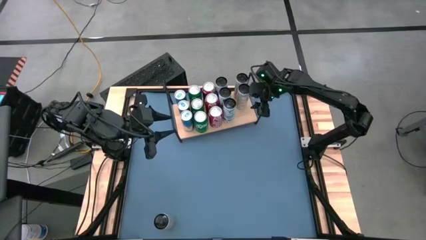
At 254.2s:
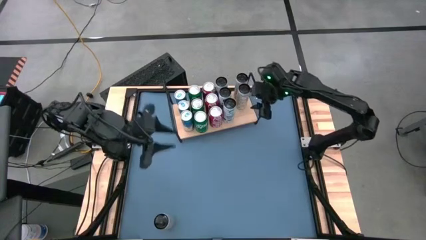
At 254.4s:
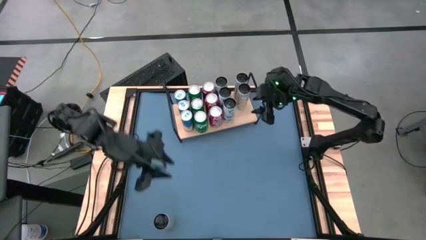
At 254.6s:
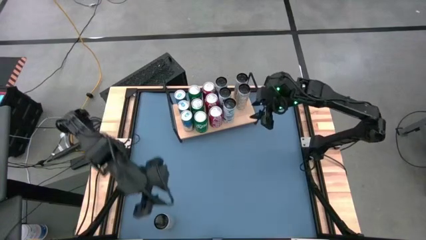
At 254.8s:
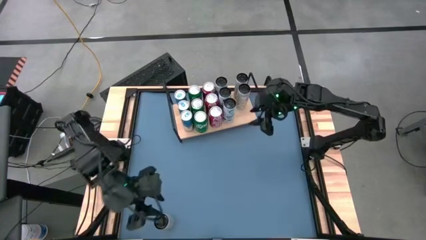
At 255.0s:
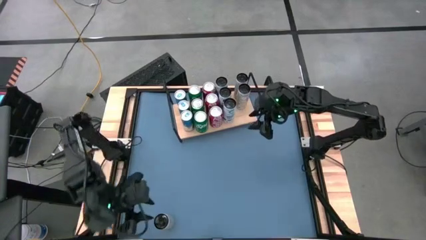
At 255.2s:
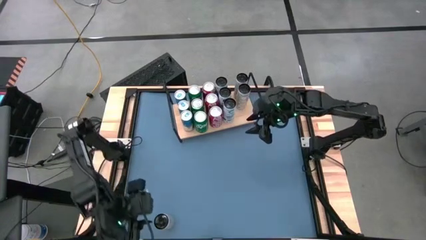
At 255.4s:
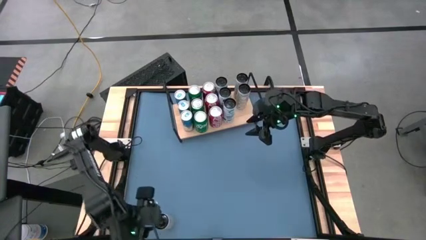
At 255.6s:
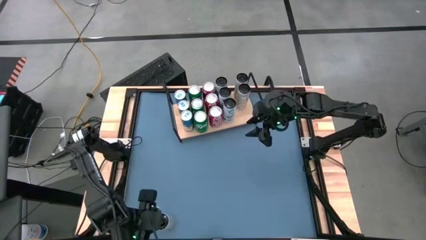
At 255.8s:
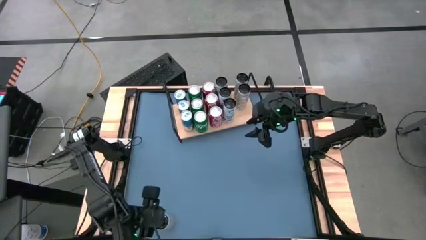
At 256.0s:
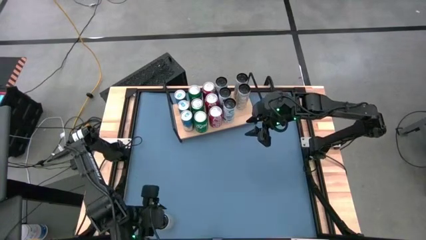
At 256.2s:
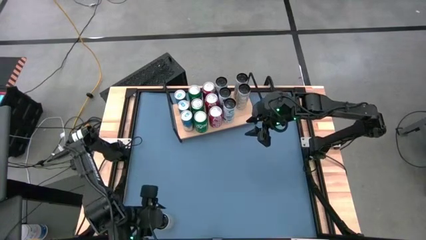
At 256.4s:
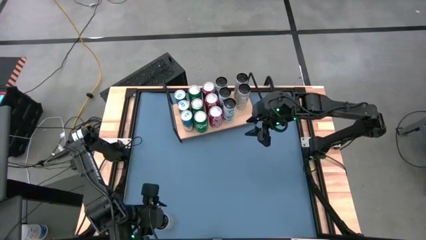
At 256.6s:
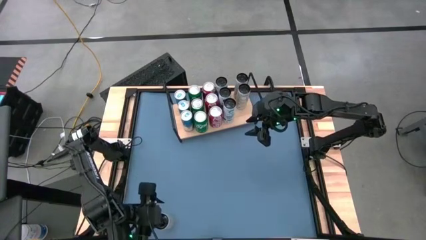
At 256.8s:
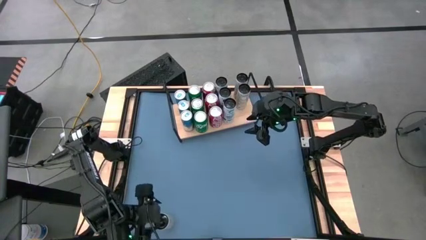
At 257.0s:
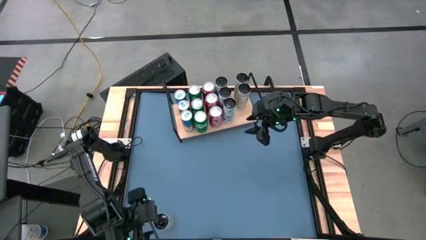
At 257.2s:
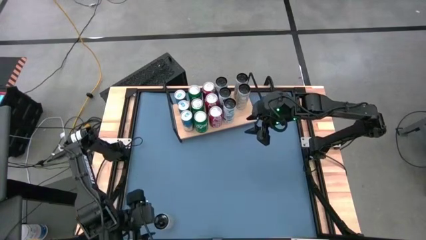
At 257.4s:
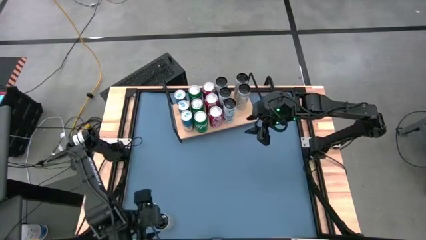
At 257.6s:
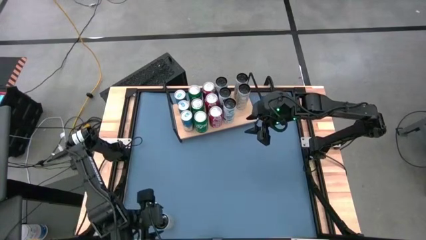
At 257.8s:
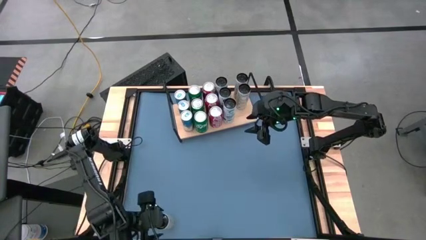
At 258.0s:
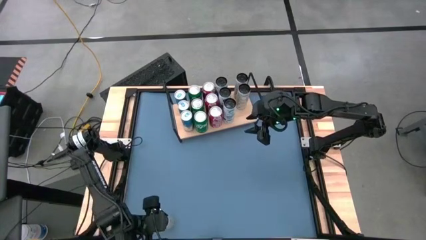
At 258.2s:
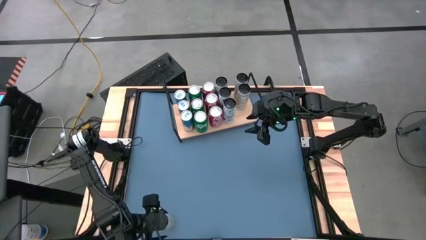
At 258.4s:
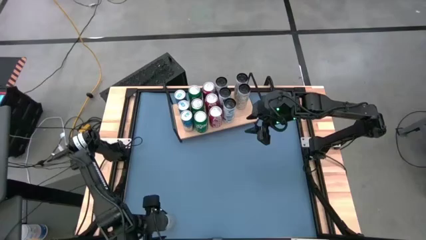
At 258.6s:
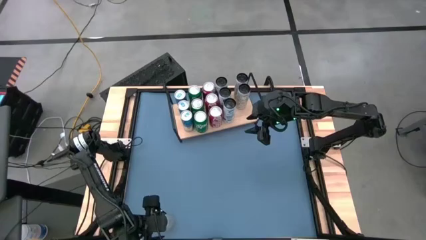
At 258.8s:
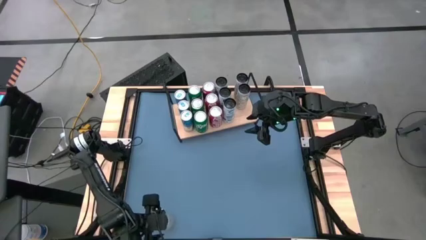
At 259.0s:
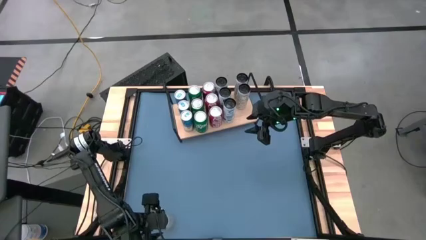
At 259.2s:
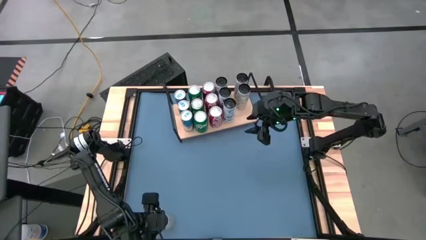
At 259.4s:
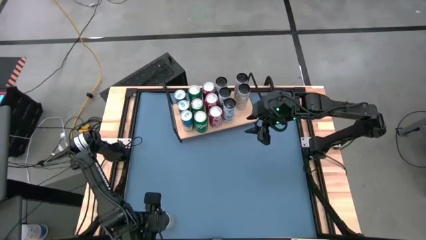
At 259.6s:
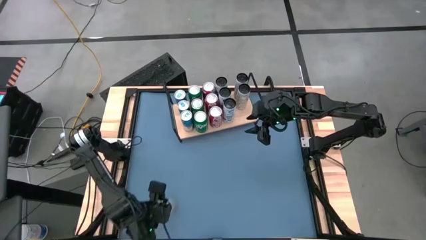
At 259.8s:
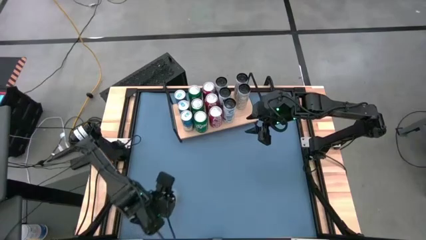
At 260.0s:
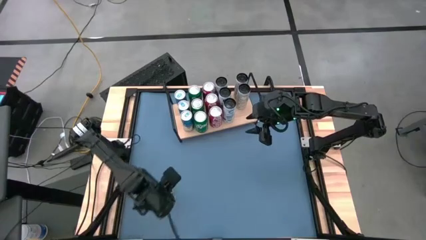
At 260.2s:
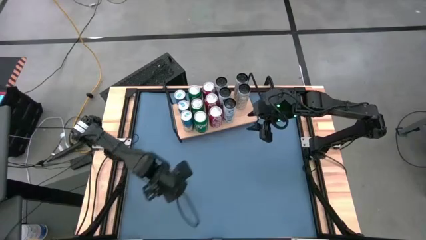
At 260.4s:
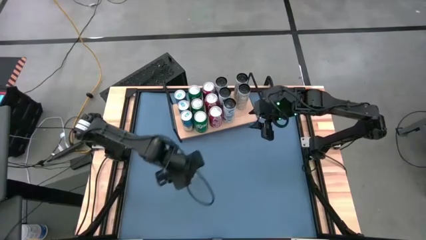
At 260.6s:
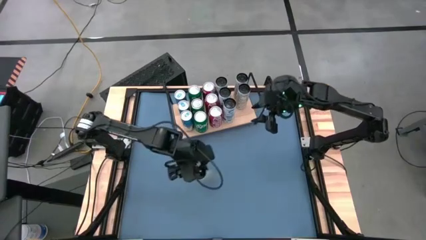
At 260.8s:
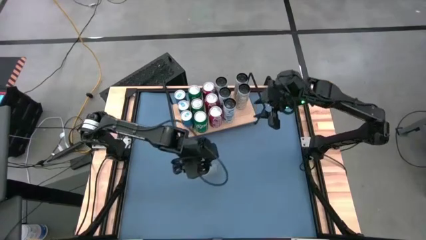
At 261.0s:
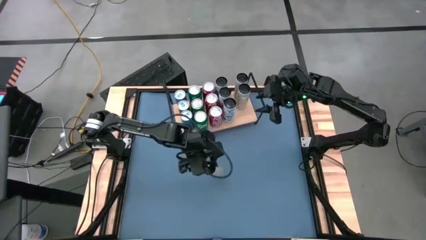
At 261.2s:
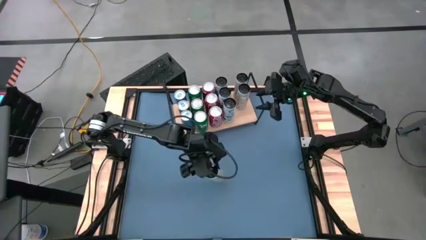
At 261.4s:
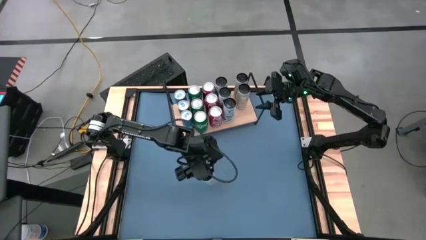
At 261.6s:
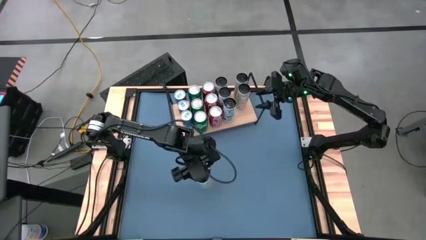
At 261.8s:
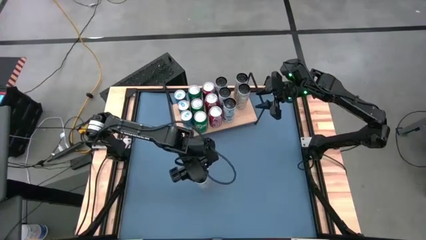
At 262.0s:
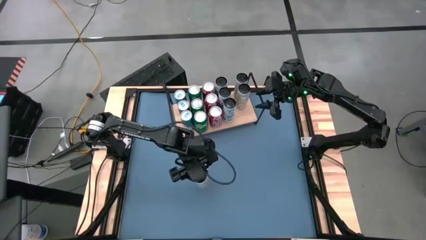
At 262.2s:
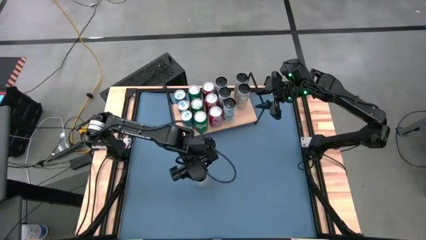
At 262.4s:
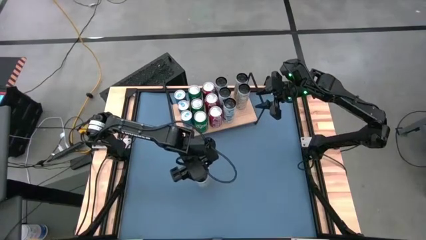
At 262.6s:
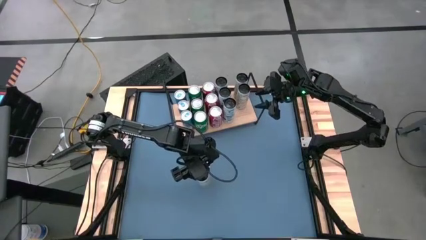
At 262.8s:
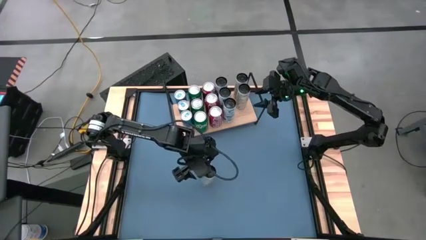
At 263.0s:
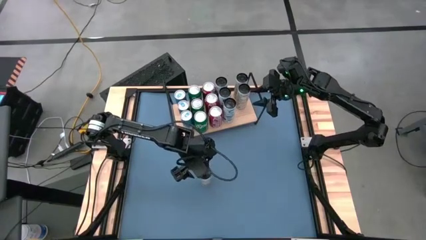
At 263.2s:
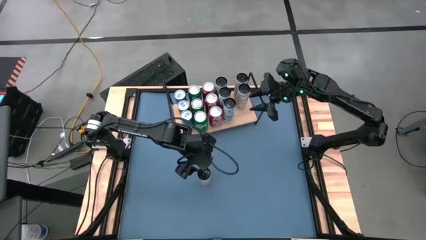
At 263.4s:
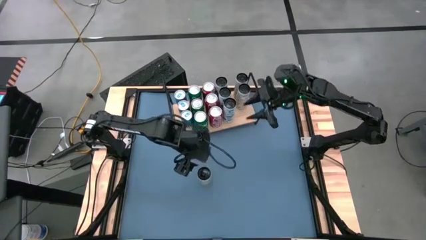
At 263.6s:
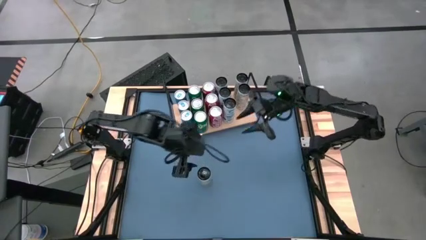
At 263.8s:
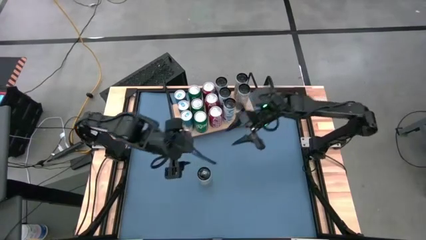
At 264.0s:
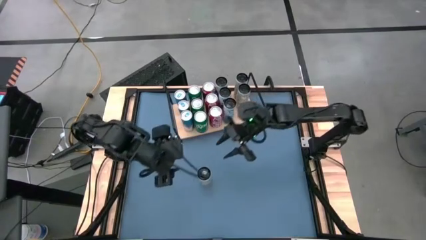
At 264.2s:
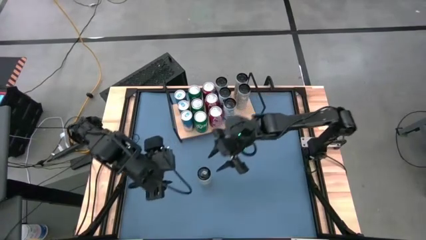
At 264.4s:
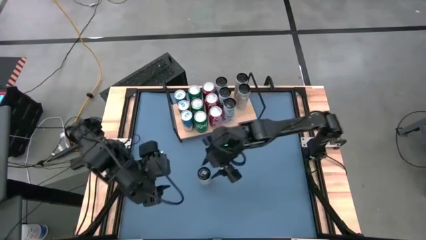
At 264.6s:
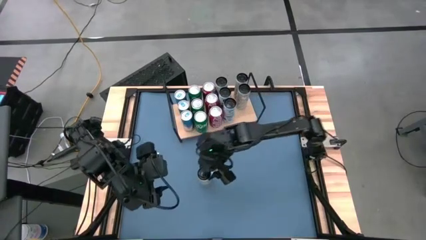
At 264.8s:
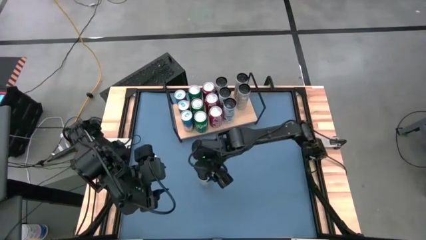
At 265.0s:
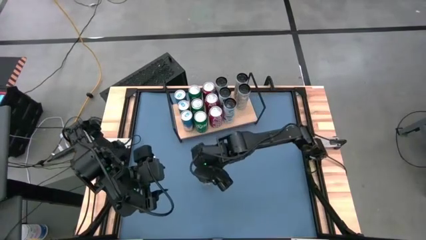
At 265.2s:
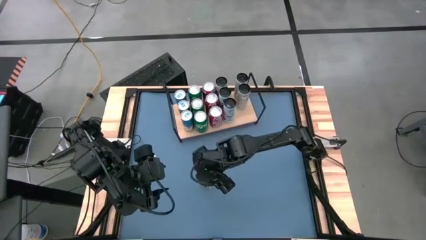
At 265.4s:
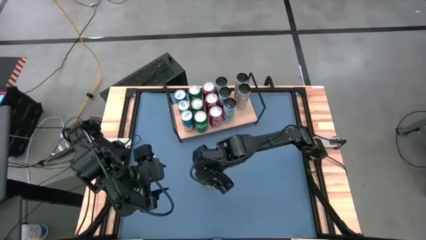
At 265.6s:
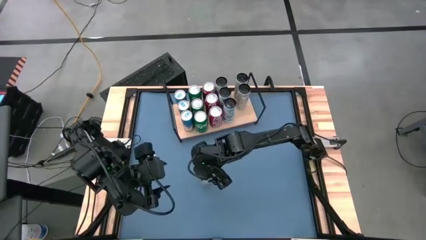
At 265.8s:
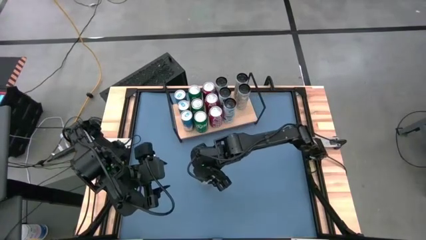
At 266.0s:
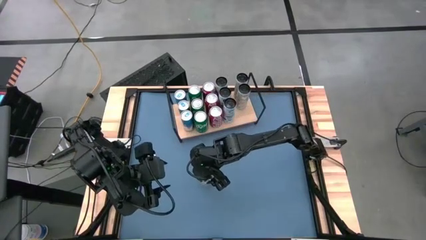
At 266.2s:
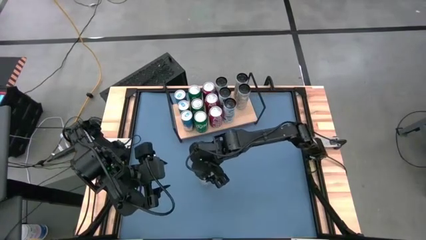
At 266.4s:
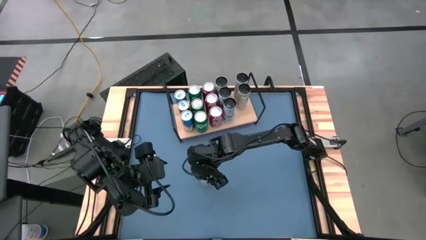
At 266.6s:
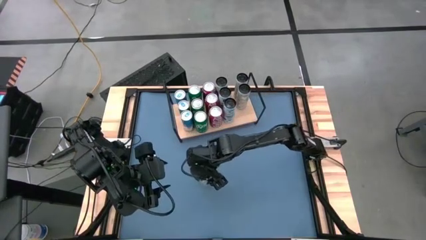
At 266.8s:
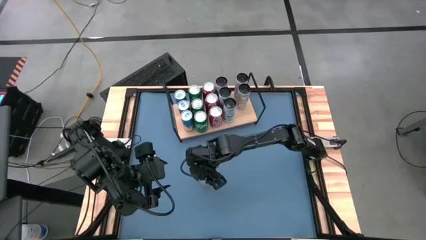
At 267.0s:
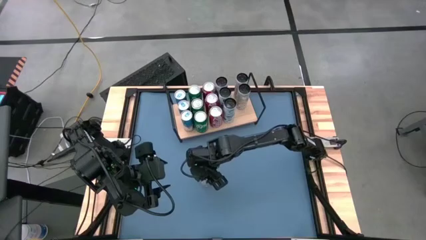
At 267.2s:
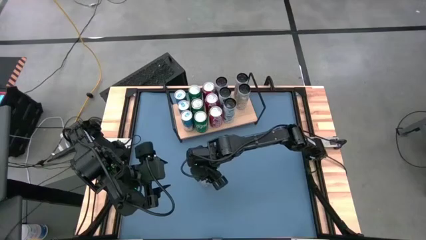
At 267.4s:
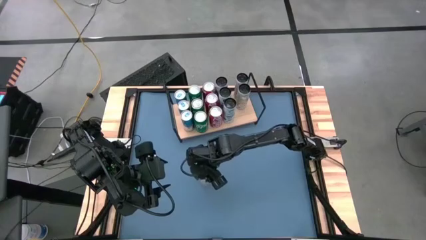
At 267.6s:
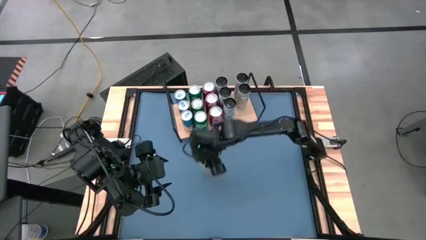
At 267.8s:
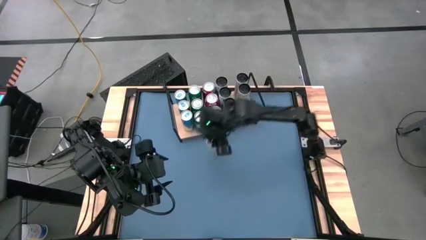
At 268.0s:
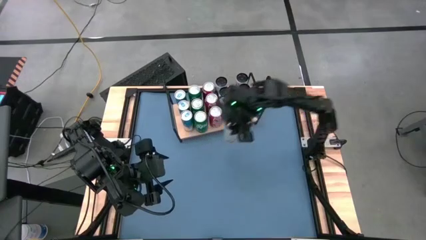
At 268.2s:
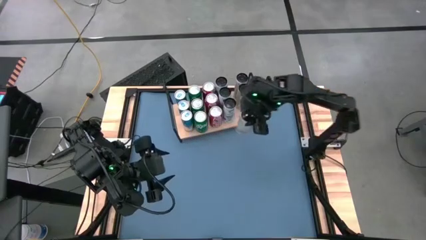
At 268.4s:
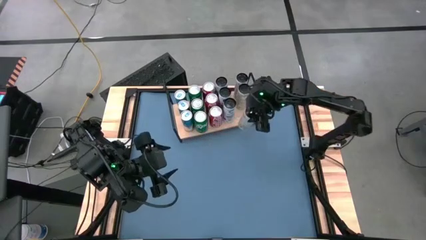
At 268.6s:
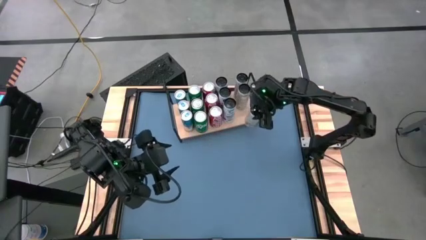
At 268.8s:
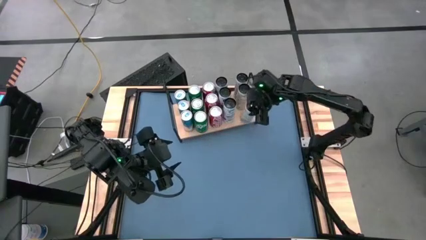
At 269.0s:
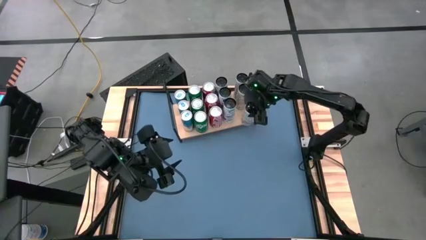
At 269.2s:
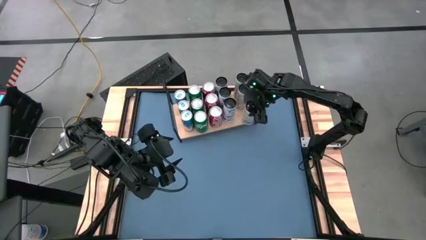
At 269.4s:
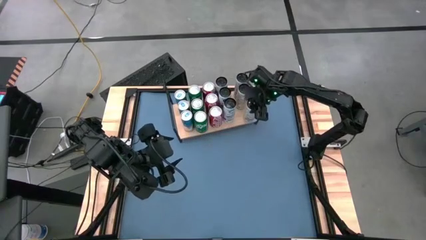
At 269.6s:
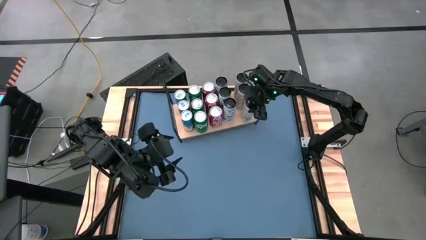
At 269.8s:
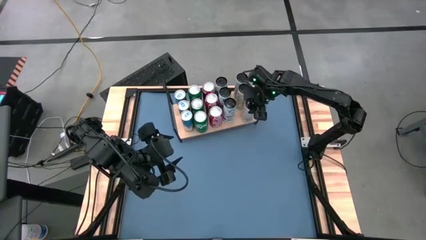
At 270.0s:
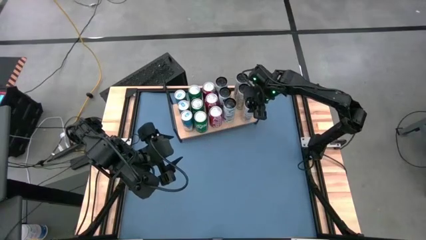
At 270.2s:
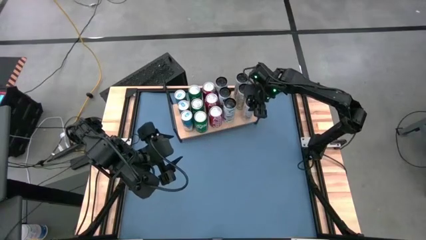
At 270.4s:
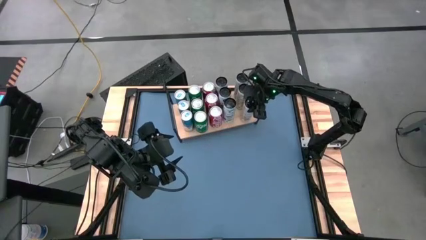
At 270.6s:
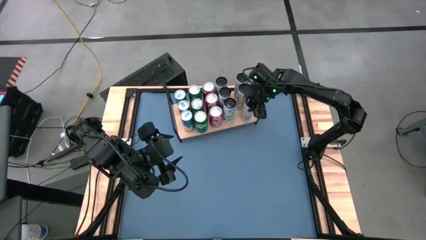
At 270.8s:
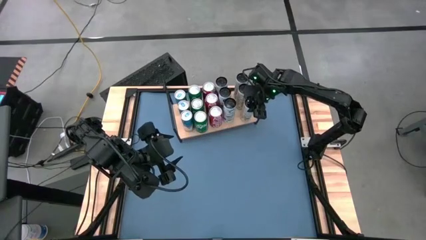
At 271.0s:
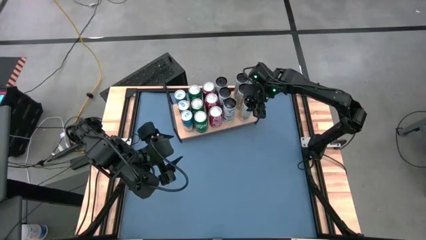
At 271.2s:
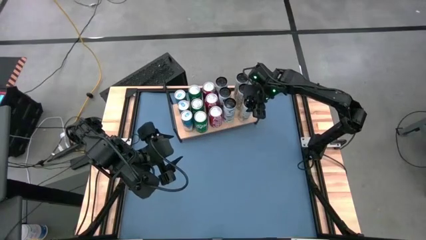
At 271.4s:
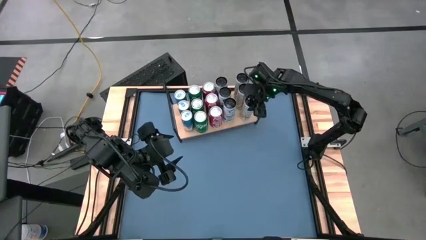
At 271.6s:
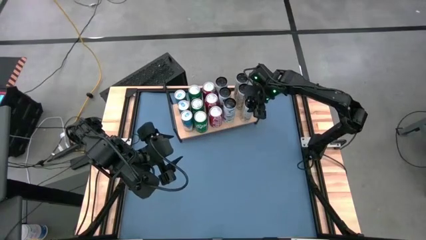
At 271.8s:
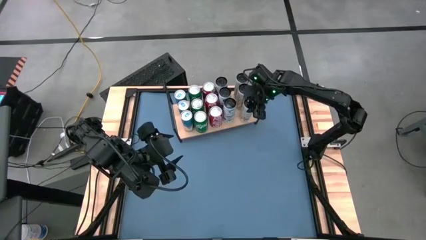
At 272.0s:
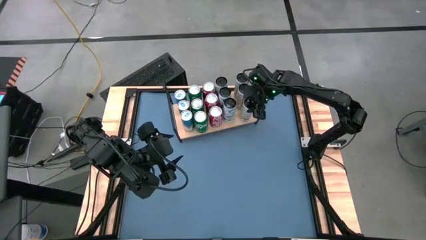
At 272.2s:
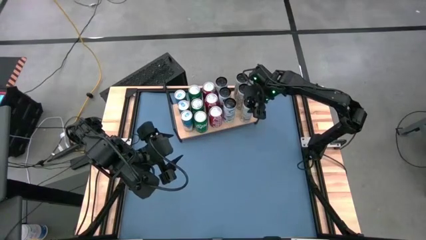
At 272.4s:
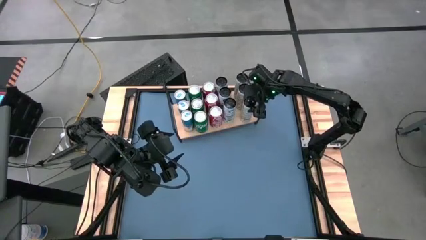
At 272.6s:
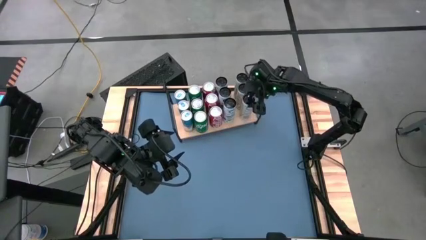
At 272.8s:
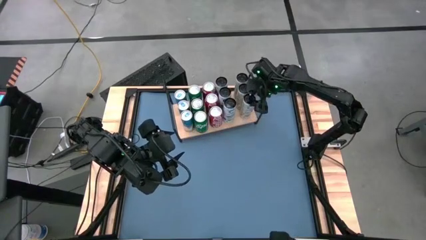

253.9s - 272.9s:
Task: Place canned beverage on shelf
Put the white yellow soda can on the shelf aligned with the other white yellow soda cans
